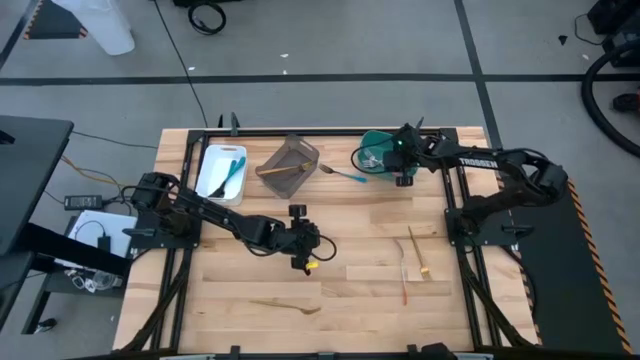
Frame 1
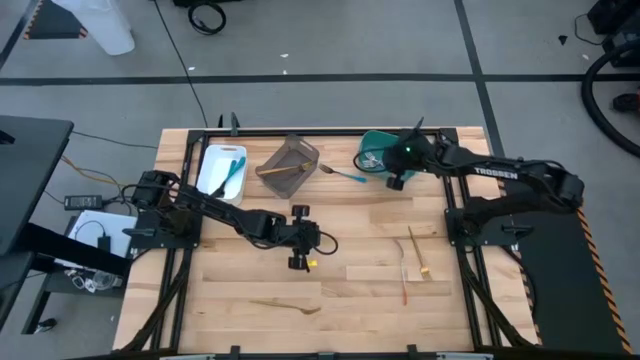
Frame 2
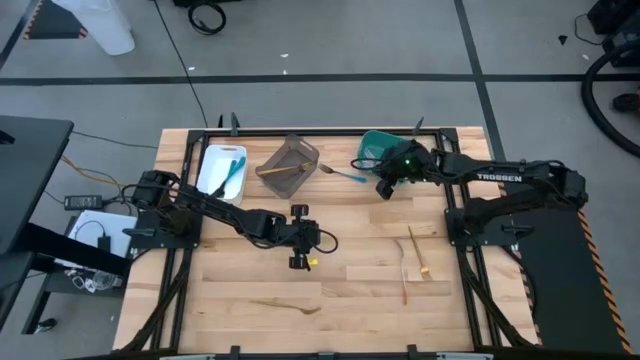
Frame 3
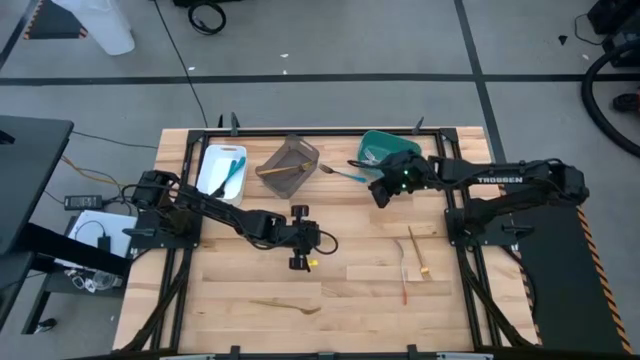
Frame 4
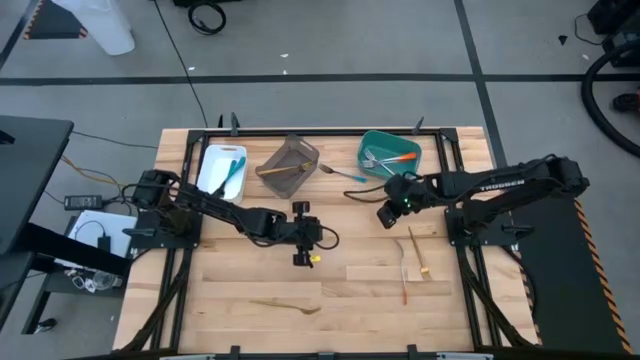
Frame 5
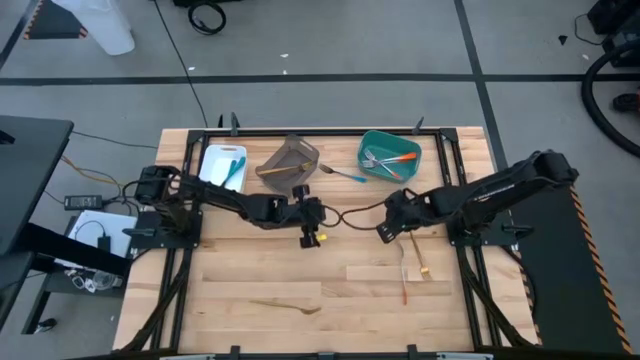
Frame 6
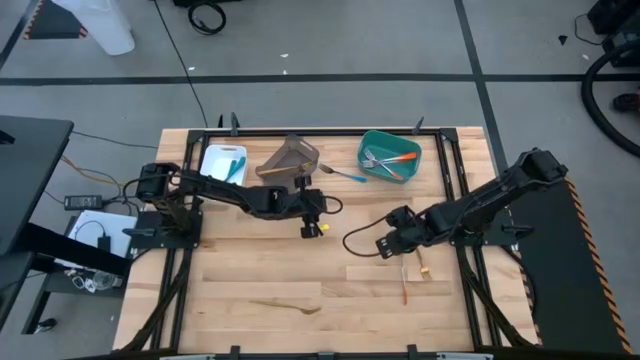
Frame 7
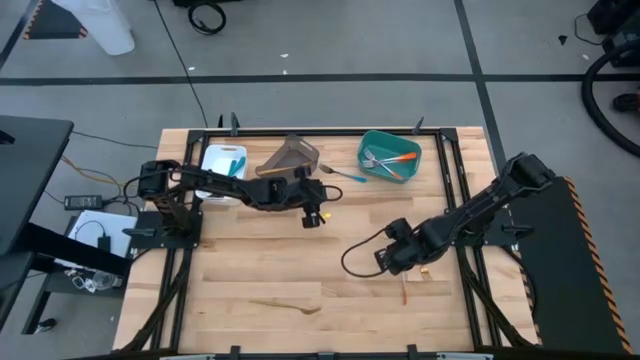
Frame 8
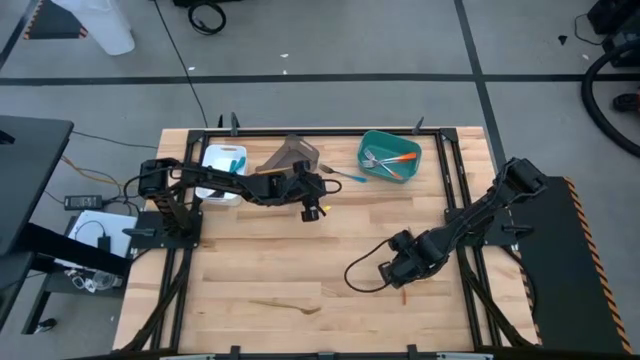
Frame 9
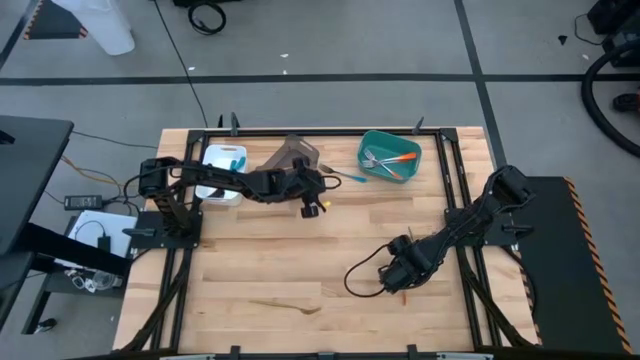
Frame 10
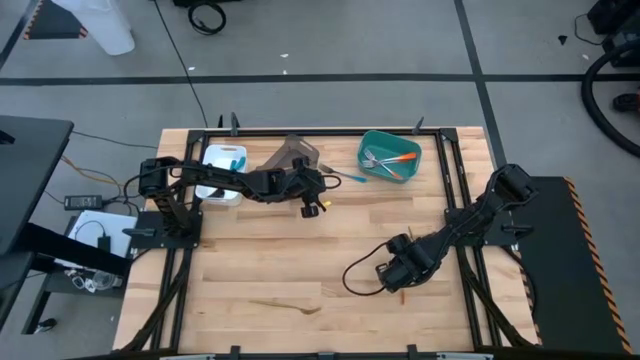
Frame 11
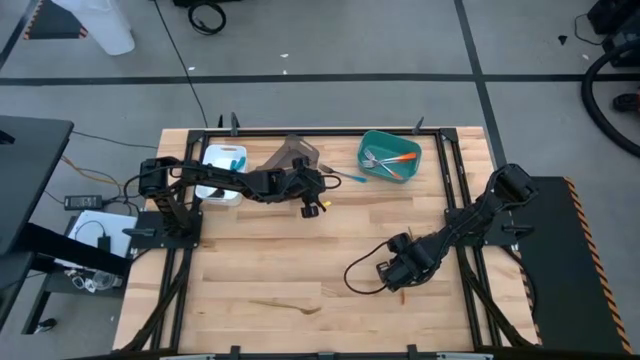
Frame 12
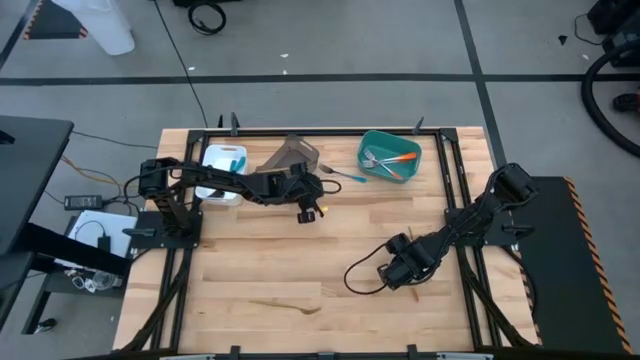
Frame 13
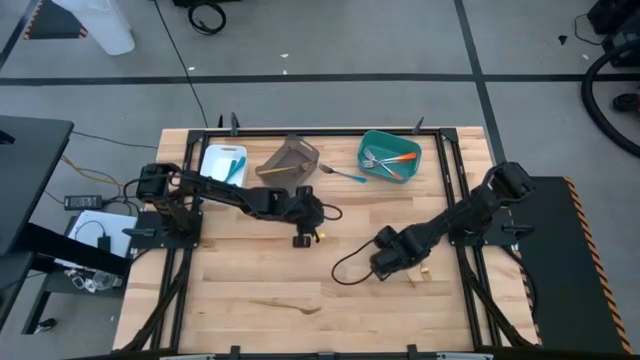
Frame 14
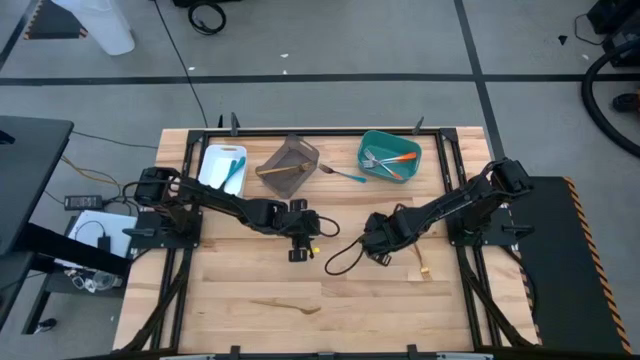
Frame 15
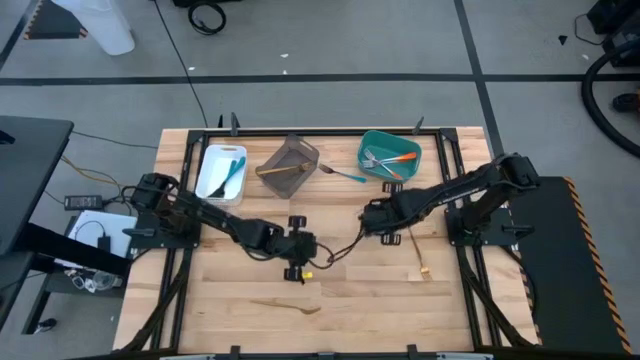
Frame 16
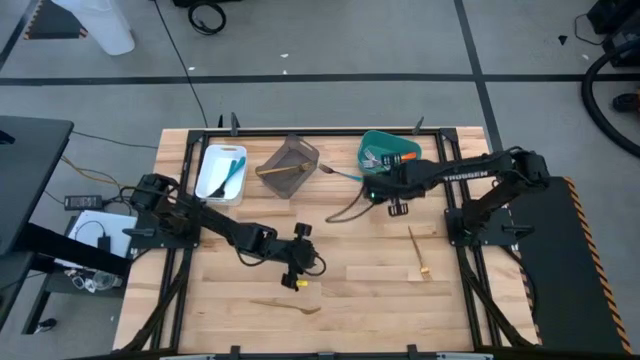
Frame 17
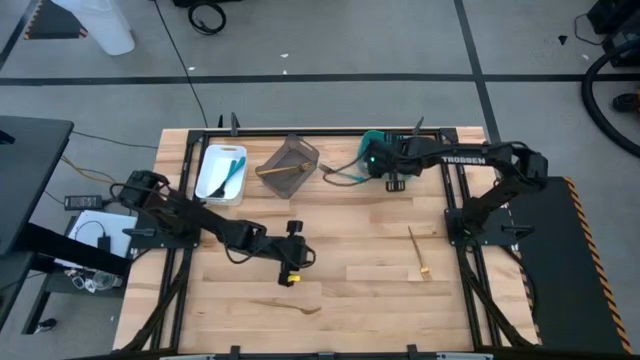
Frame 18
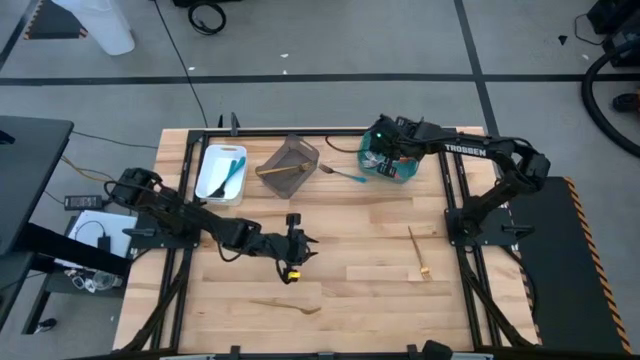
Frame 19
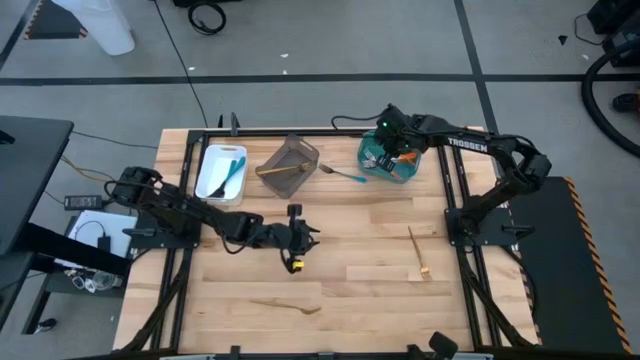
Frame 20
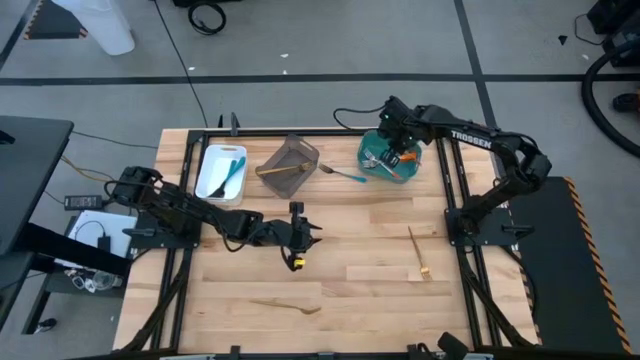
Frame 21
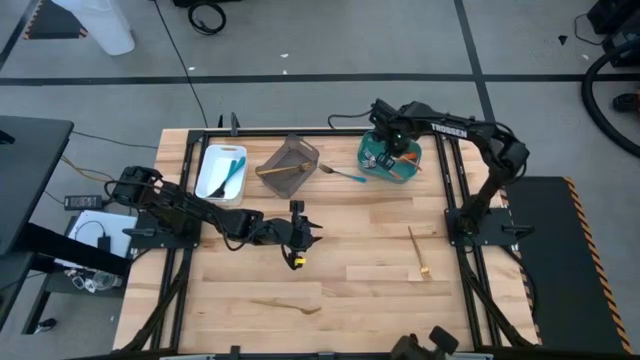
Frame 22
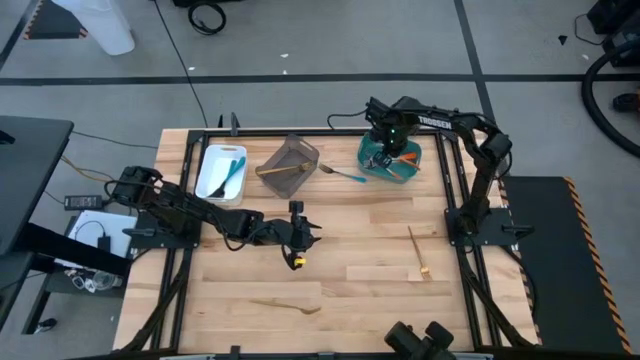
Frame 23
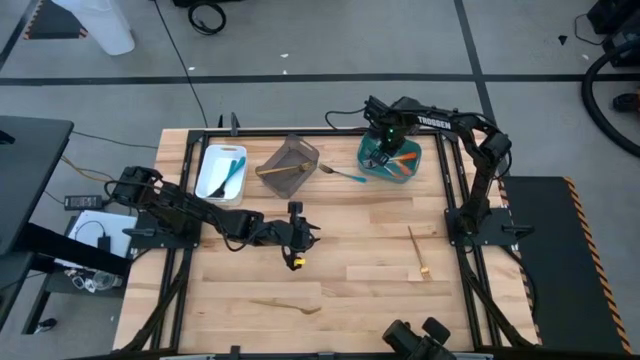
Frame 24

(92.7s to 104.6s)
Task: Sort silverware by color (type)
Put the orange fork into the green bin

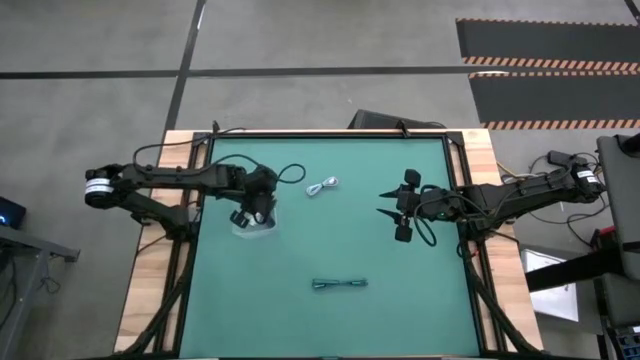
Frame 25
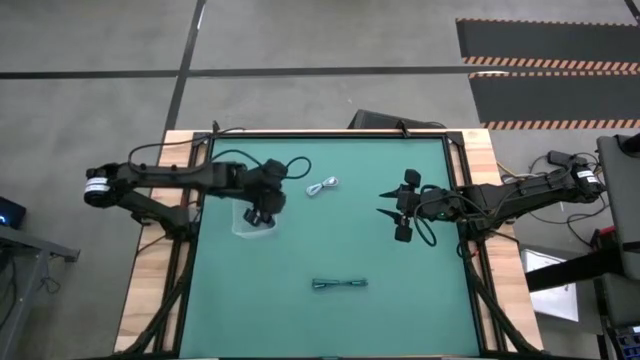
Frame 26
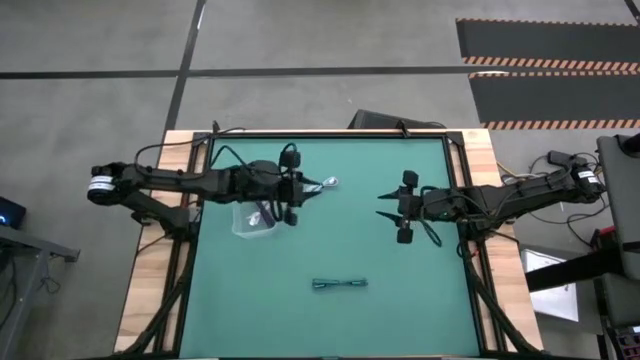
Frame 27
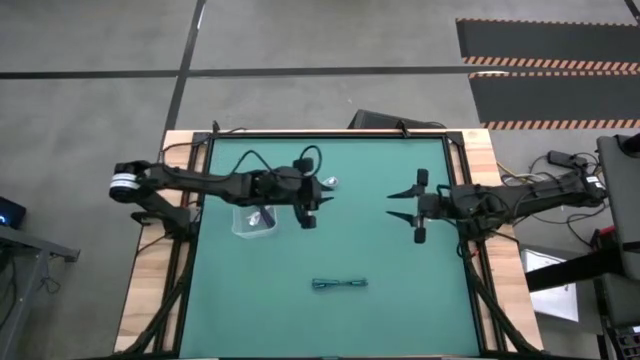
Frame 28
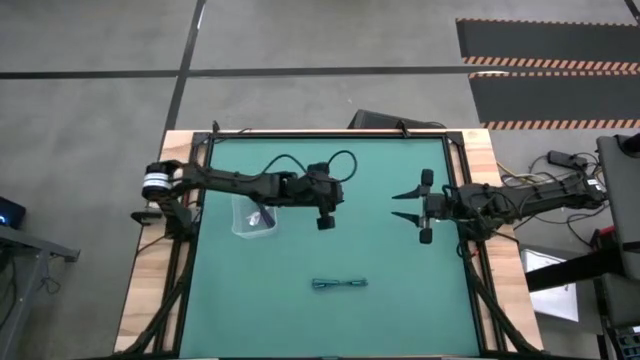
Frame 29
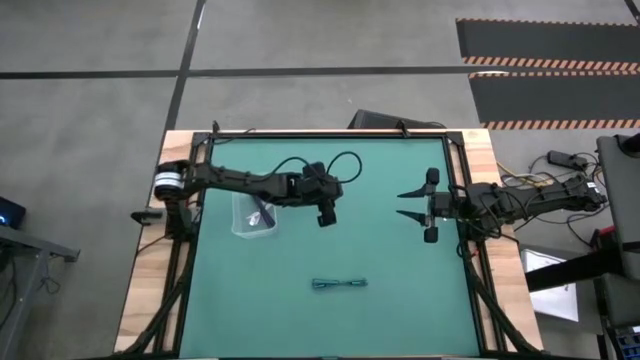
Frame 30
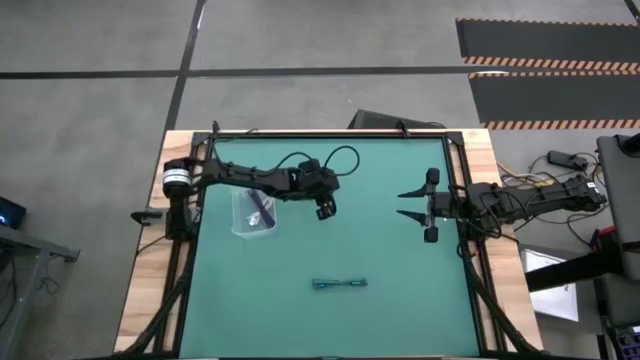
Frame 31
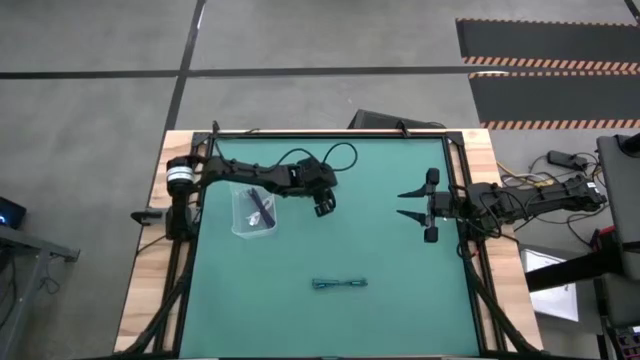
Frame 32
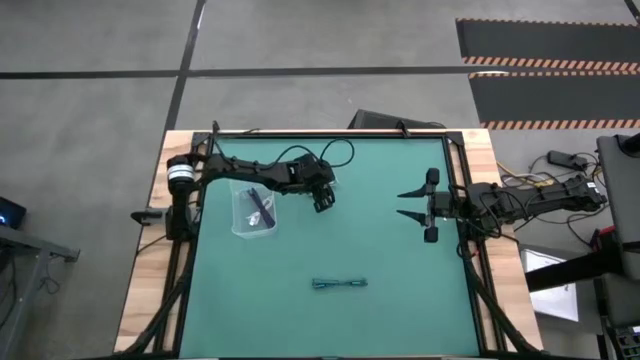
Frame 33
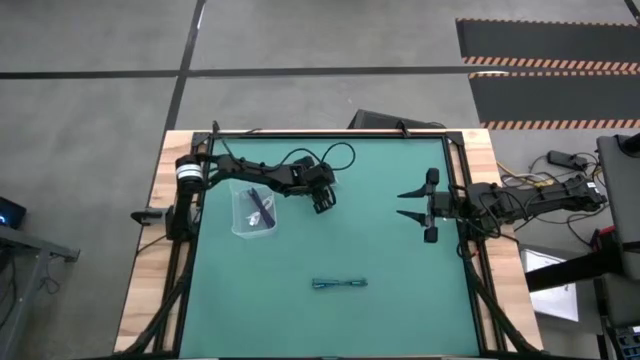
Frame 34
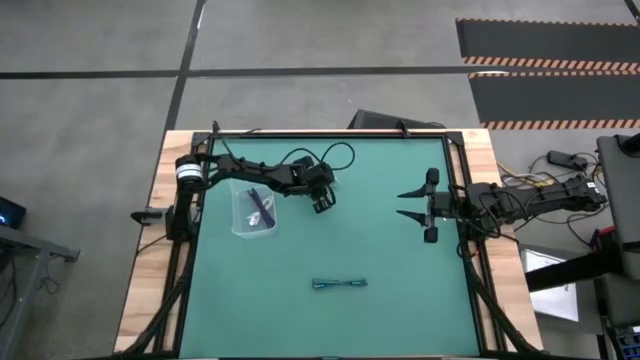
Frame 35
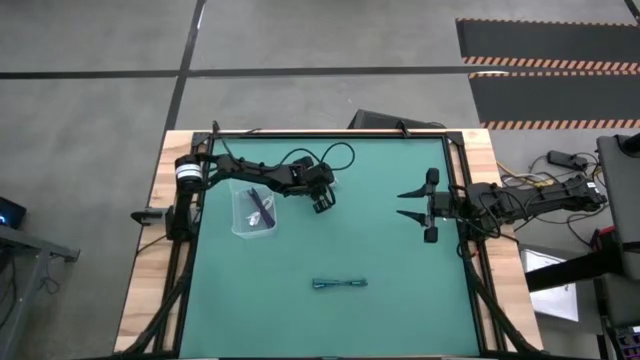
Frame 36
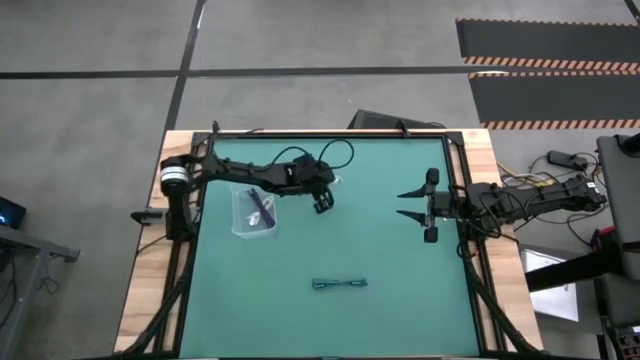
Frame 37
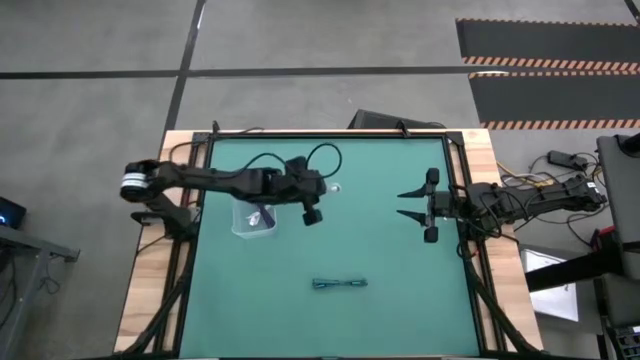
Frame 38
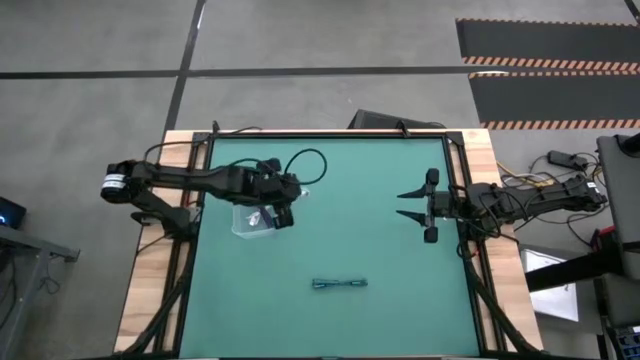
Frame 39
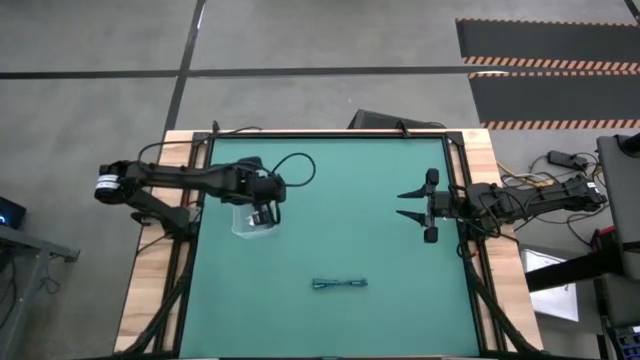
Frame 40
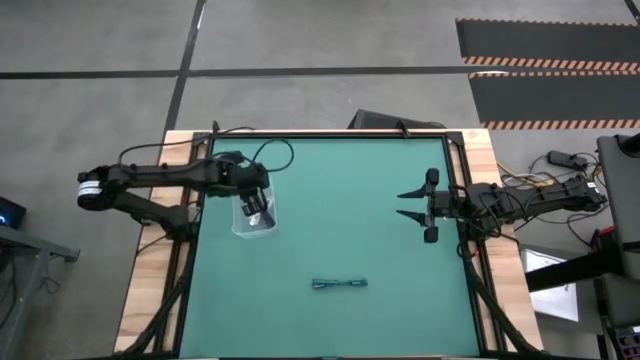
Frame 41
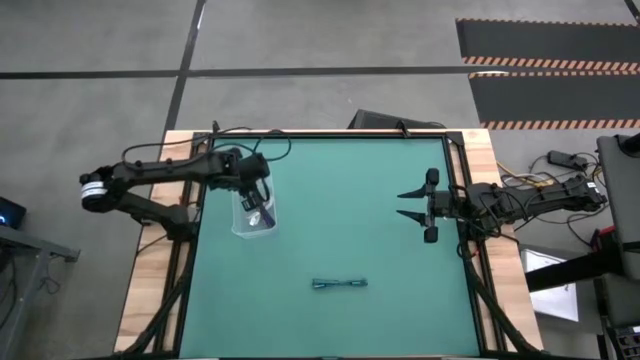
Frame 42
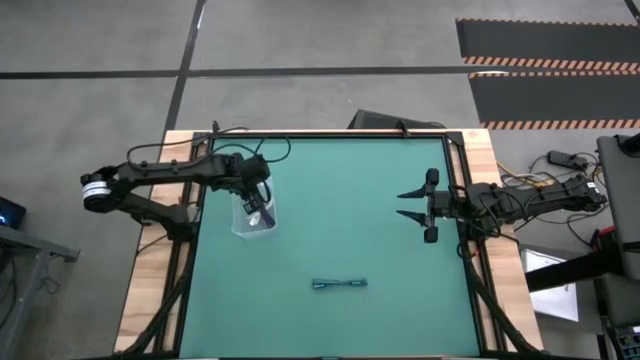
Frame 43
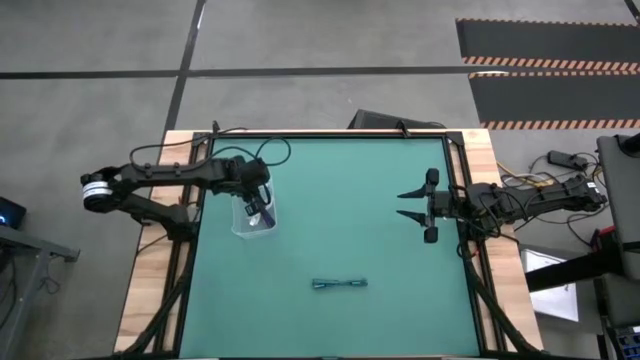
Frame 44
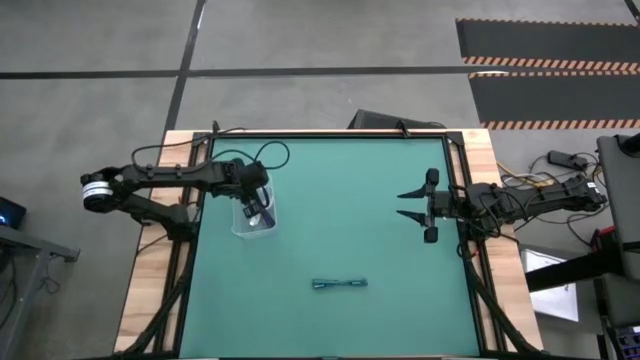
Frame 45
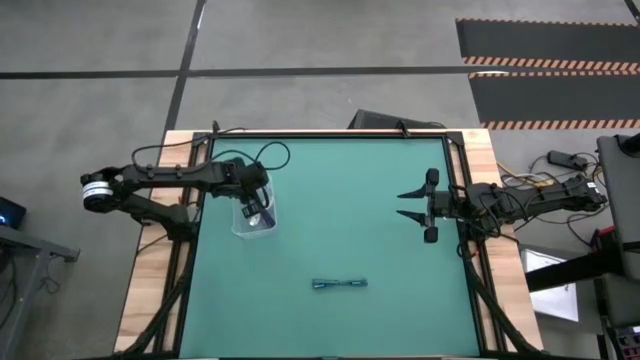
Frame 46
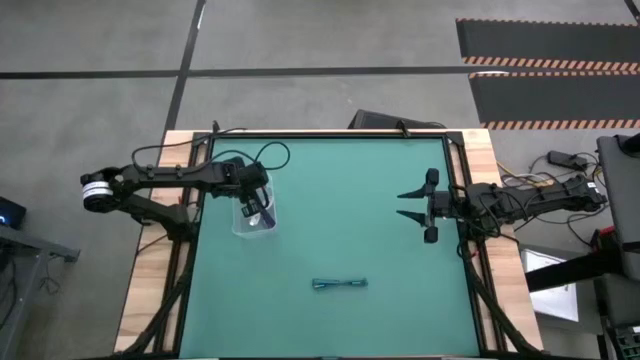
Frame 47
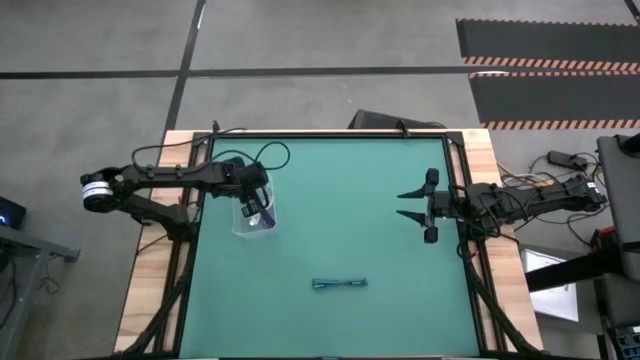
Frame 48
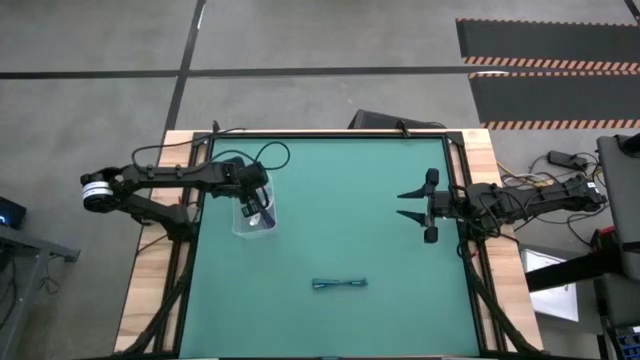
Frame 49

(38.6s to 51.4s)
Task: Pick and place USB-C Cables
Put the gray charger cable into the transparent bin
